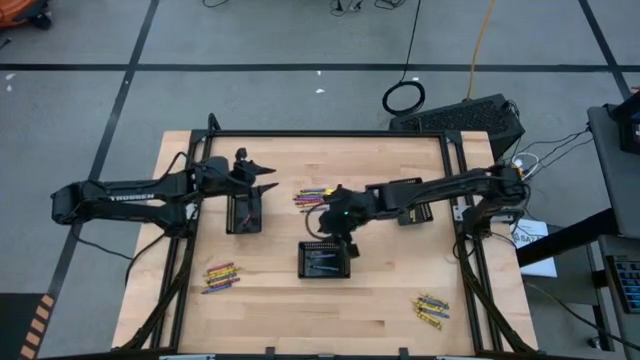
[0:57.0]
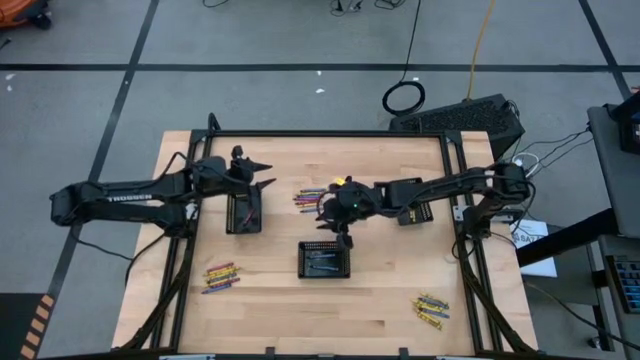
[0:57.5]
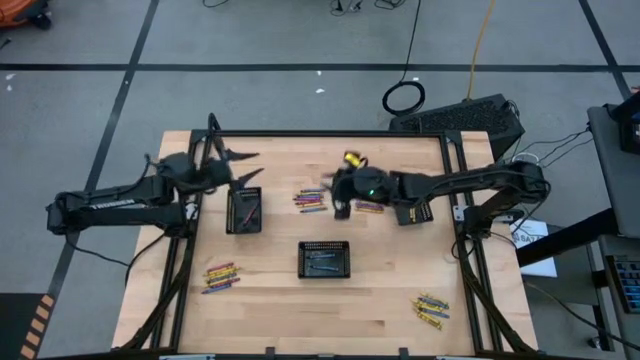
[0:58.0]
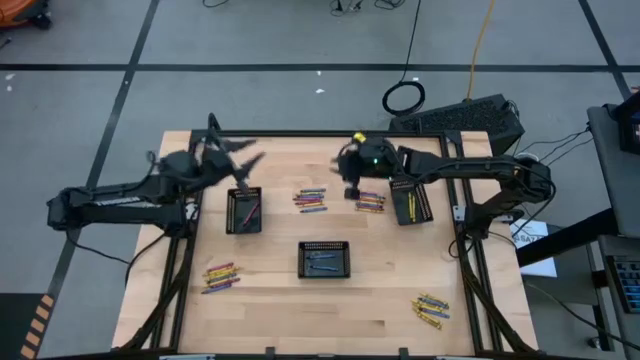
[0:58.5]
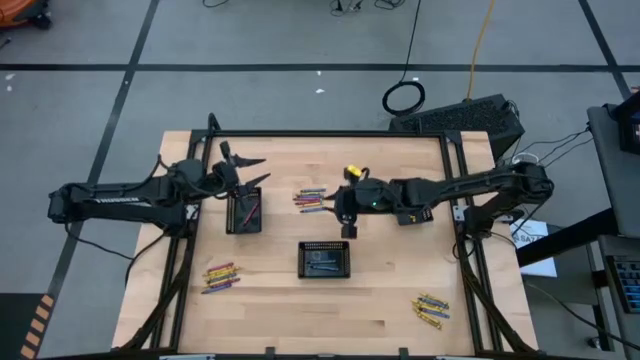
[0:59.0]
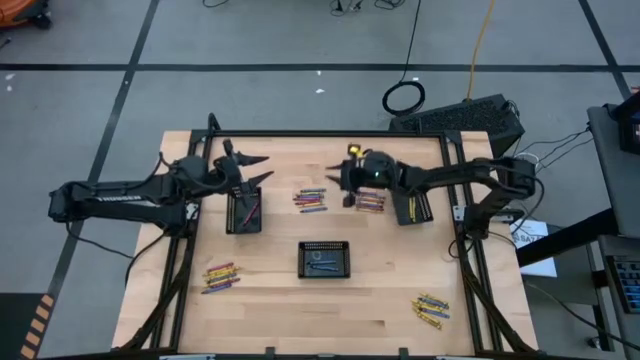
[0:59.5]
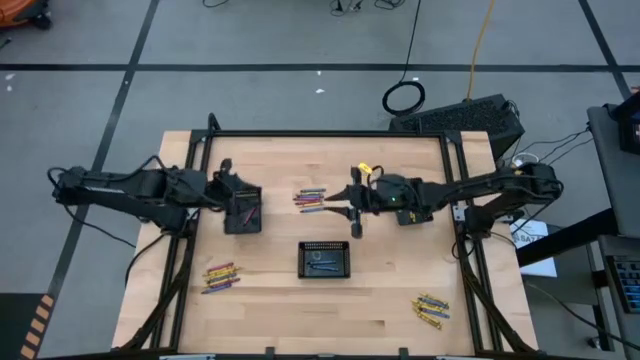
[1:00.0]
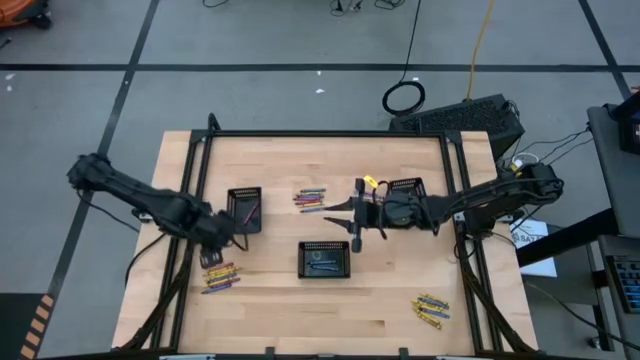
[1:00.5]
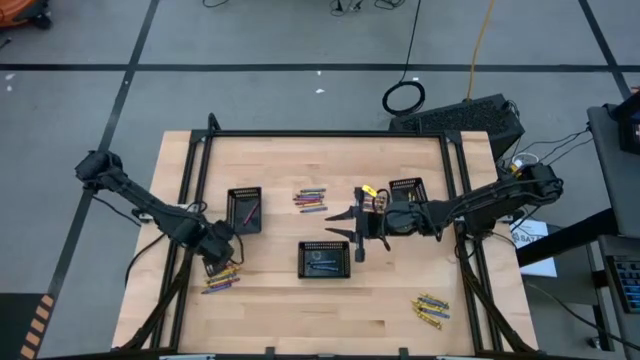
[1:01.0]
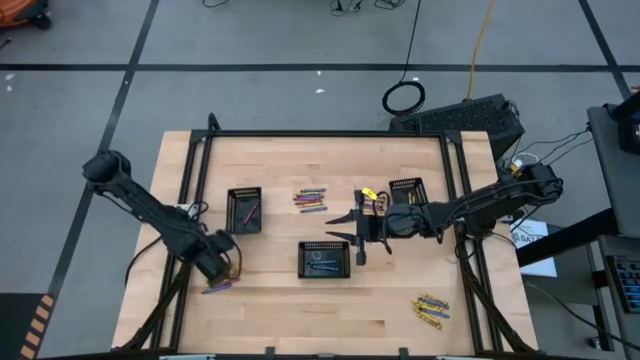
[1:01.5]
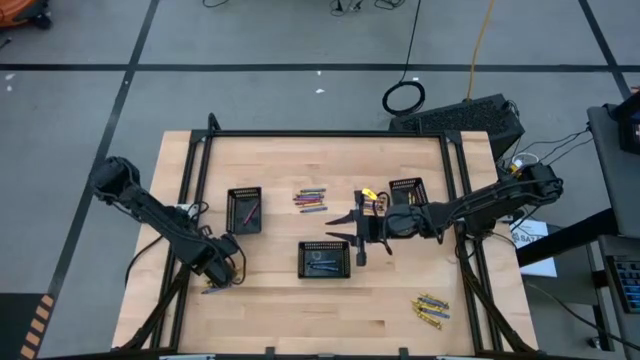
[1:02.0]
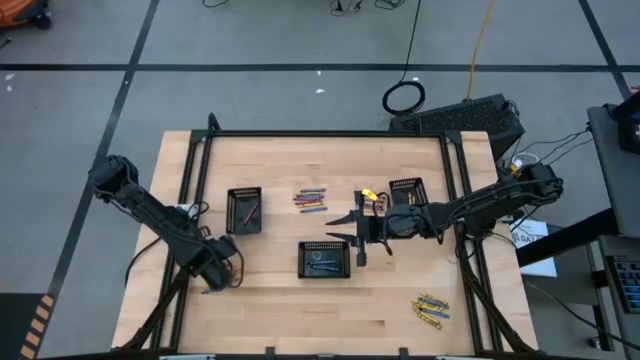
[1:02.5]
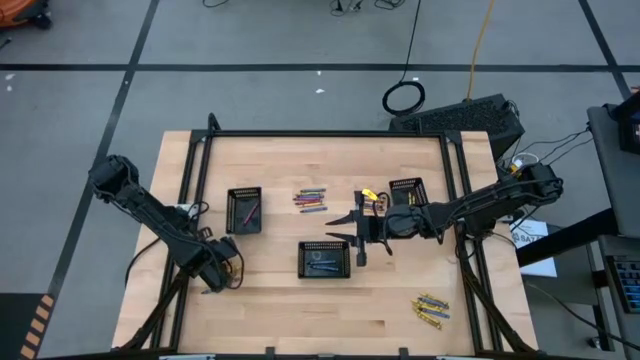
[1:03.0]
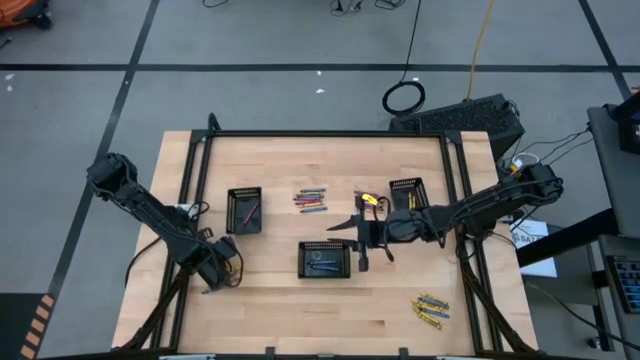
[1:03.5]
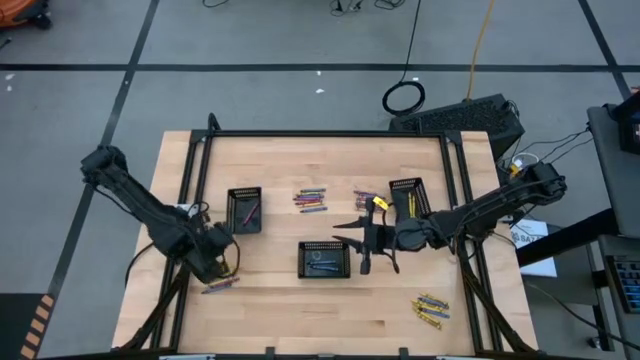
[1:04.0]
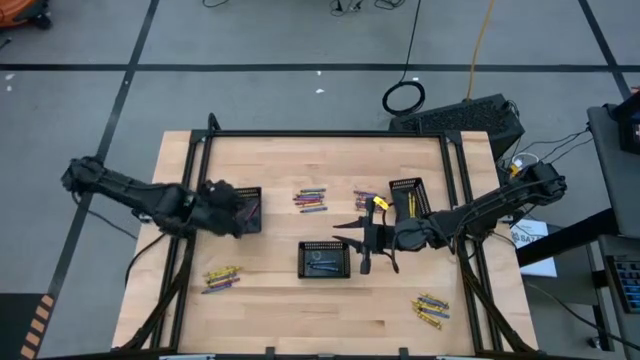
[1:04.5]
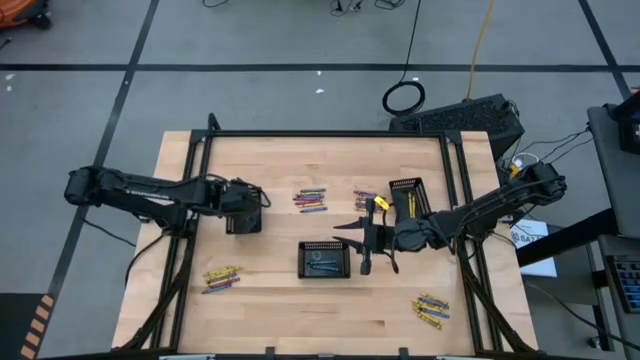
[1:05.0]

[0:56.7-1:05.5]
Task: Sort crayons
Put the red crayon into the left black basket

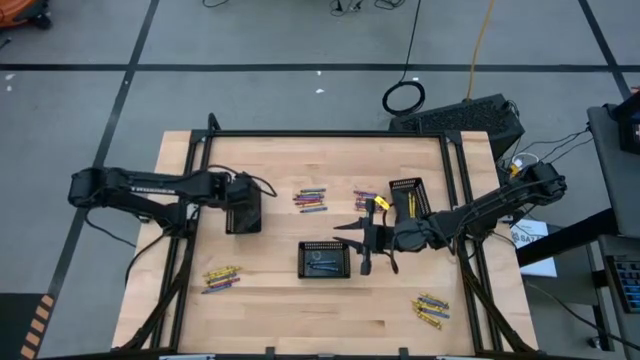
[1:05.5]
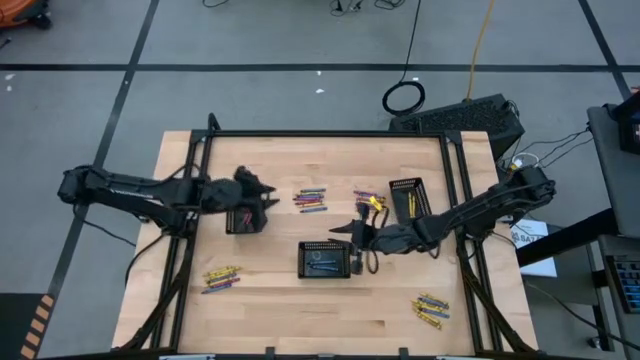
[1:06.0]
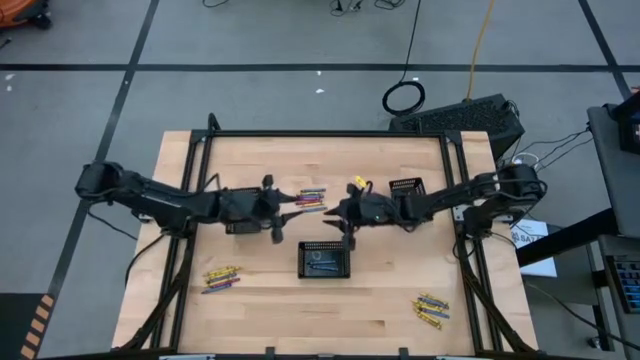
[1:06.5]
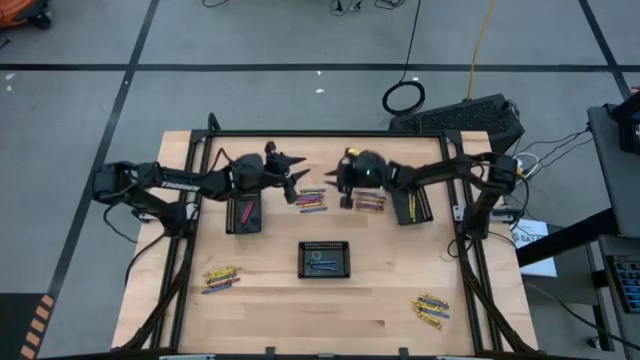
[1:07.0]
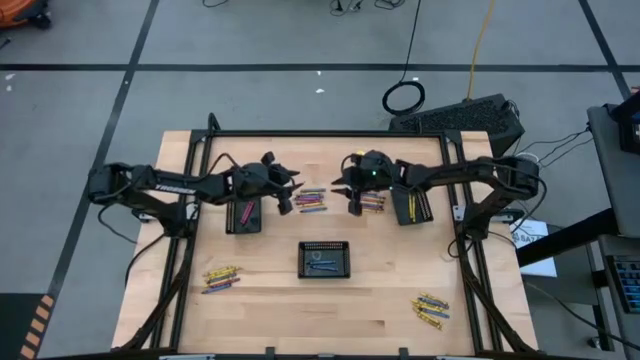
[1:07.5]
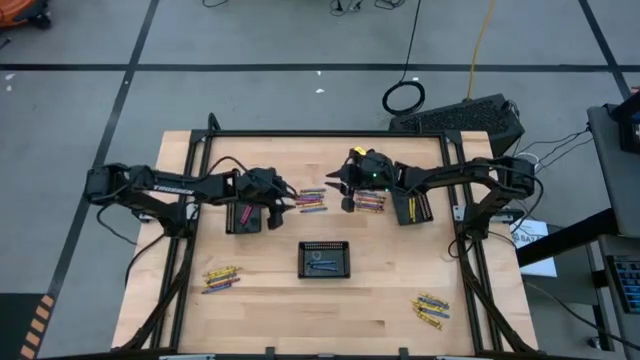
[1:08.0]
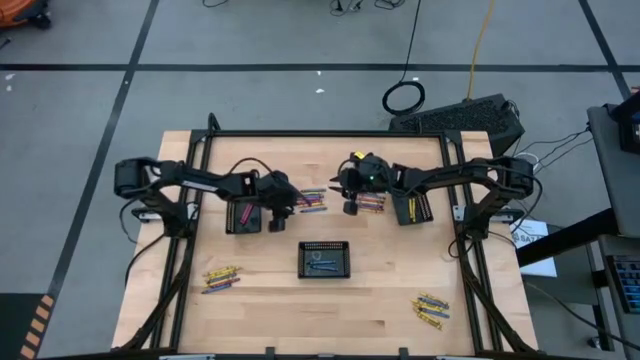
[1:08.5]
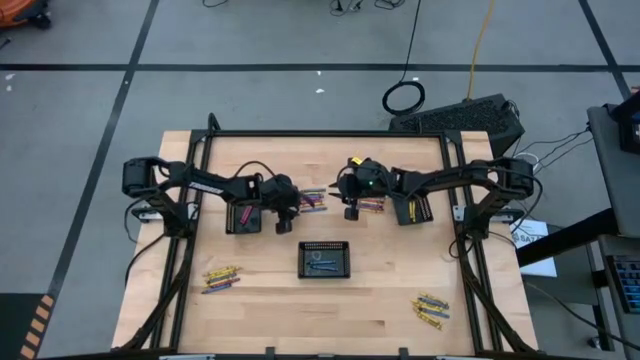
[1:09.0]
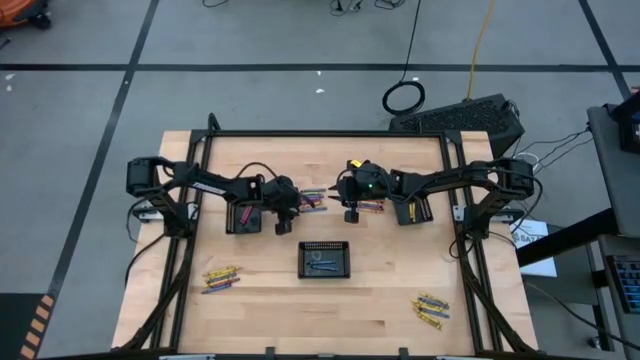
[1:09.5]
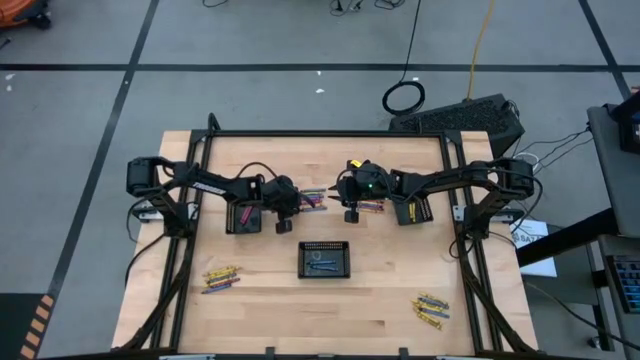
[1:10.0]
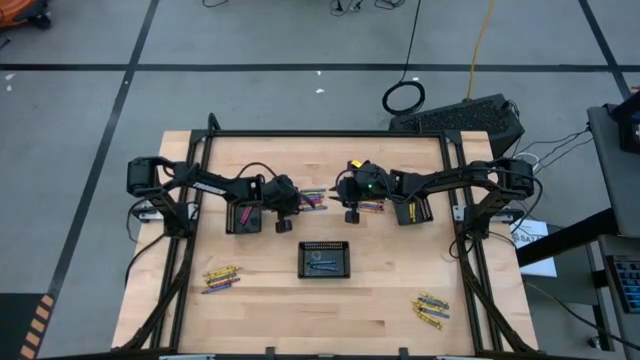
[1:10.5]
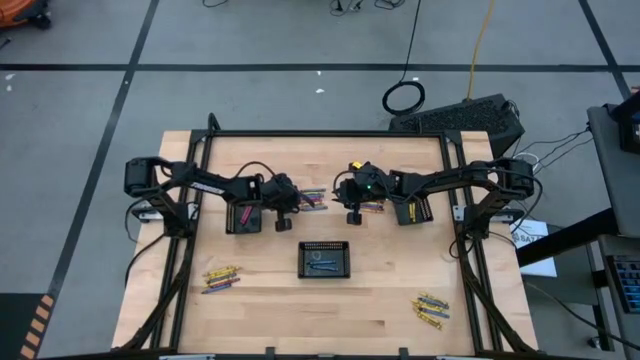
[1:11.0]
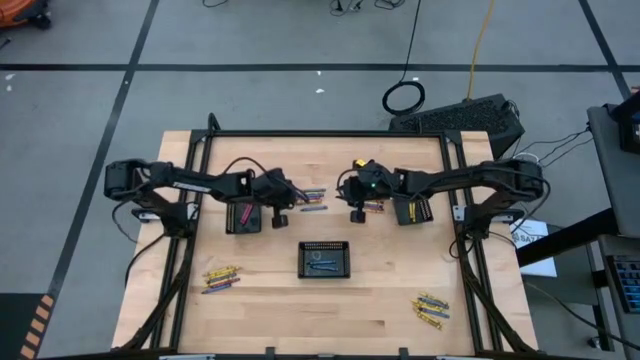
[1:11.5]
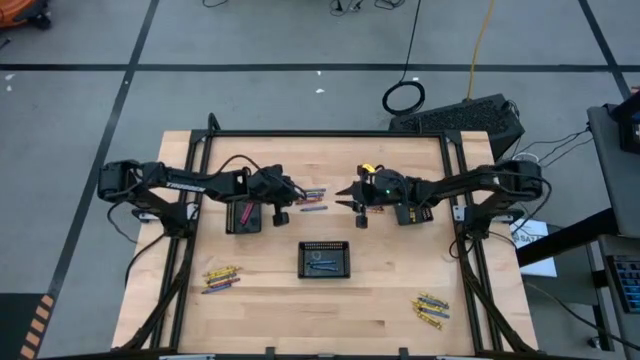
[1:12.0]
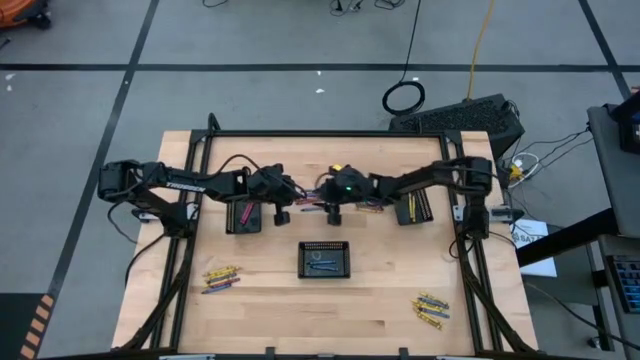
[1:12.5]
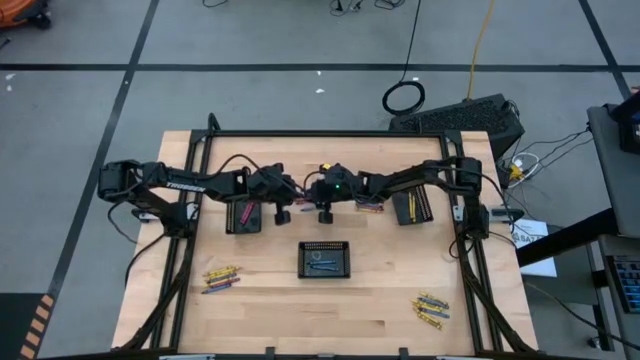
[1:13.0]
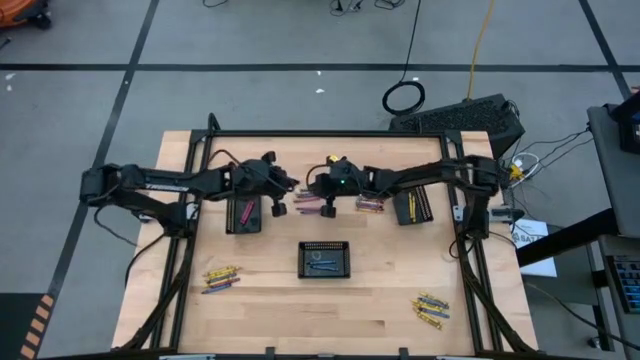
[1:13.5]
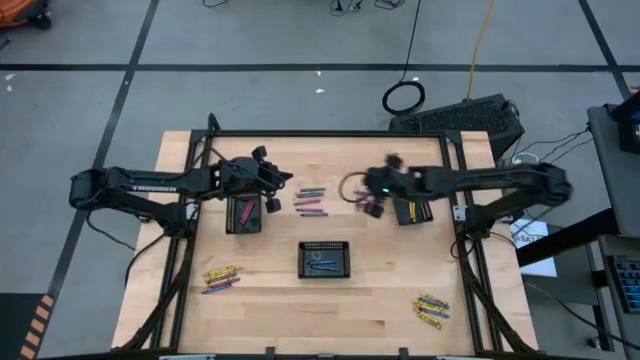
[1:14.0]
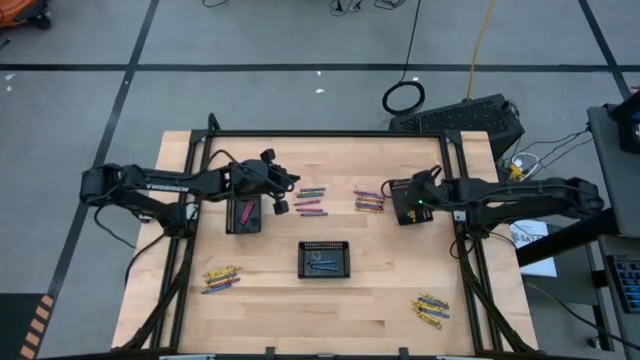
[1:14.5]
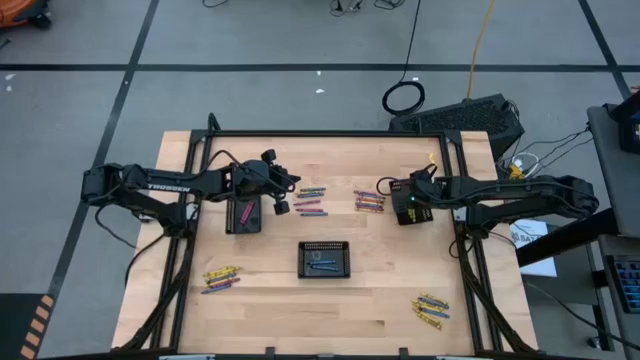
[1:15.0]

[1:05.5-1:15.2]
Put the yellow crayon into the right black basket

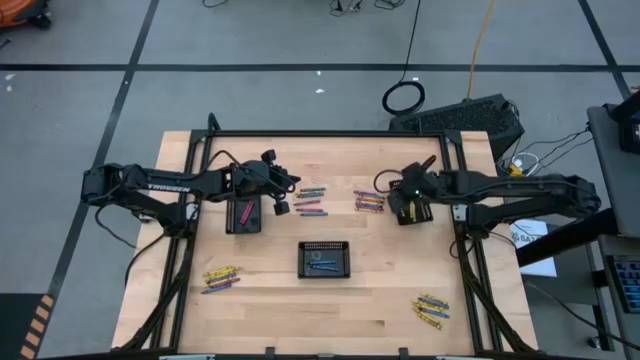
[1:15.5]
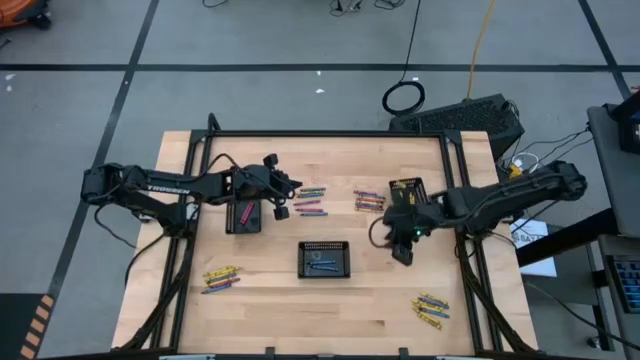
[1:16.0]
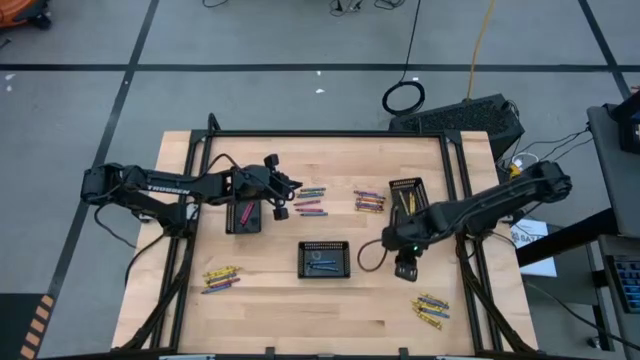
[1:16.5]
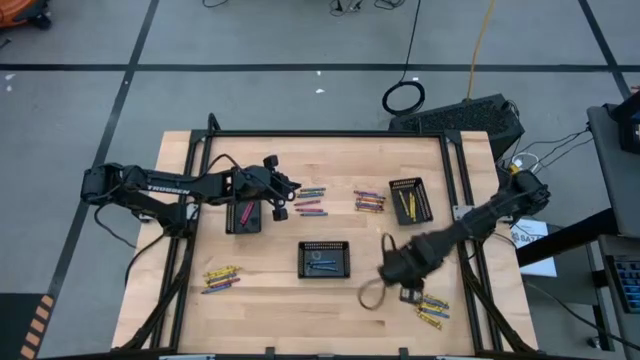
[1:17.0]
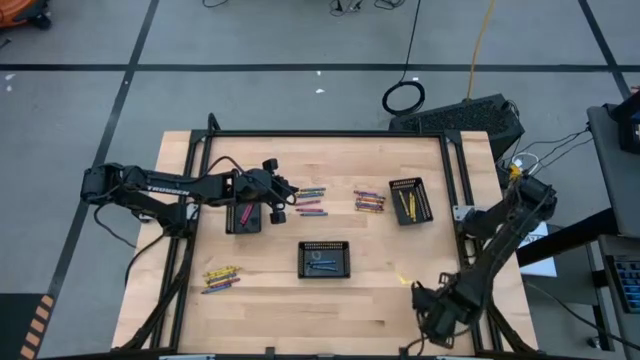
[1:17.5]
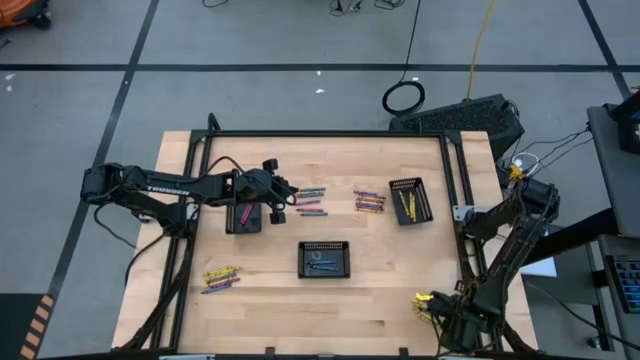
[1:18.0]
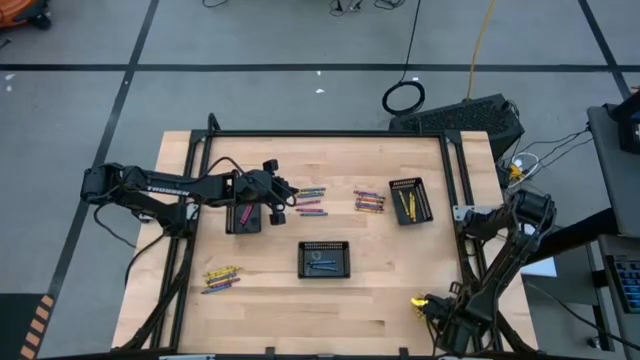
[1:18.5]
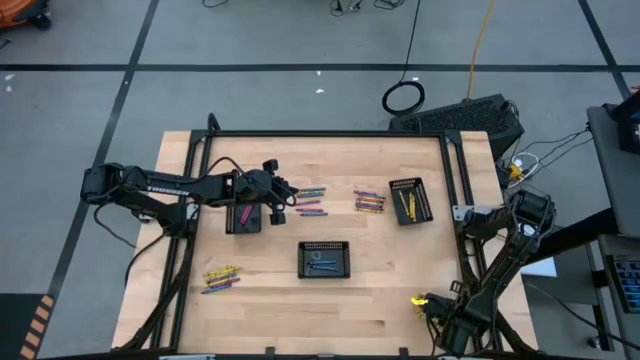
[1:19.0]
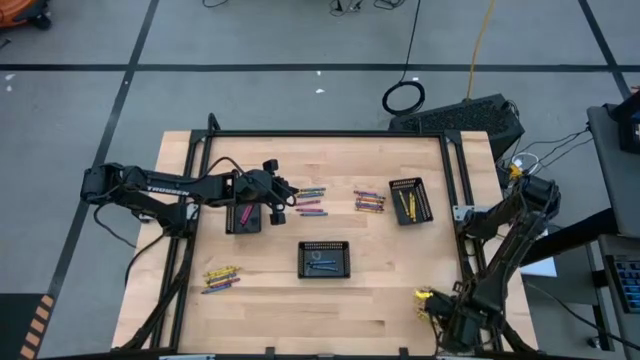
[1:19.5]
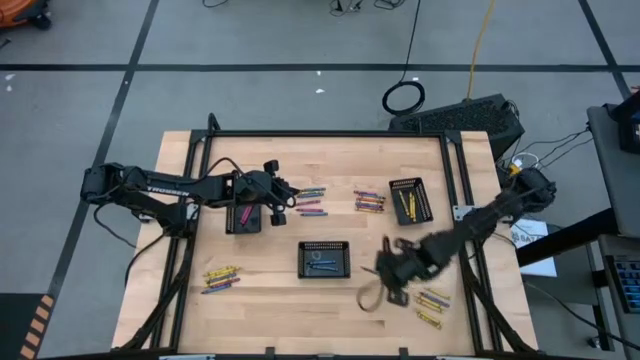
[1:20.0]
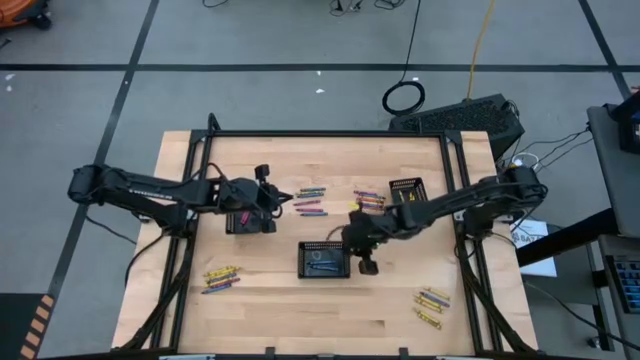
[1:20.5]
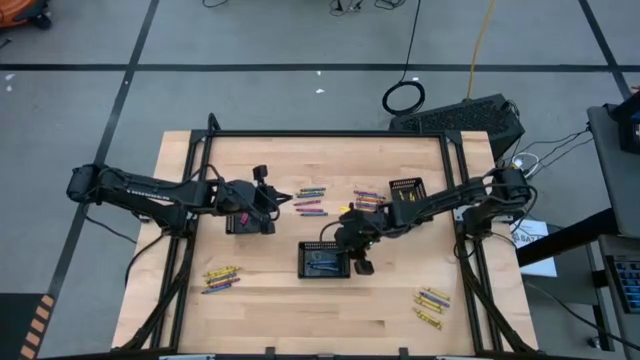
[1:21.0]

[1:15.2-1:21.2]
Put the blue crayon into the center black basket
